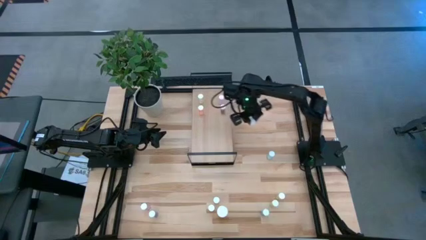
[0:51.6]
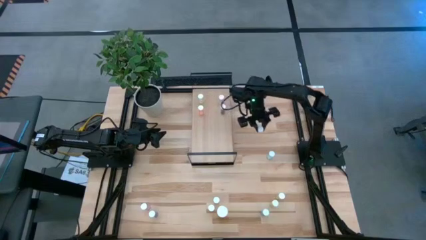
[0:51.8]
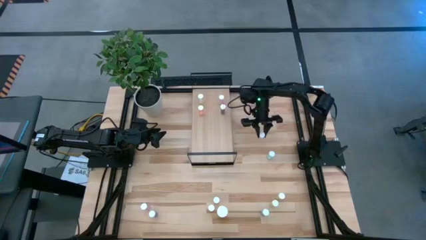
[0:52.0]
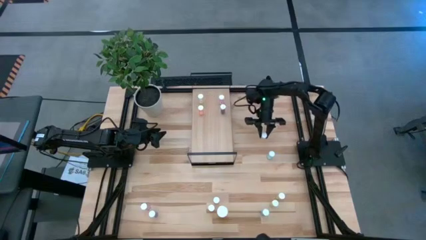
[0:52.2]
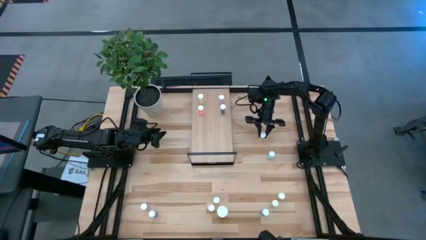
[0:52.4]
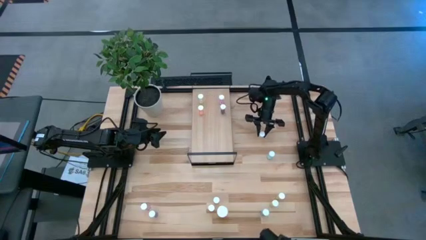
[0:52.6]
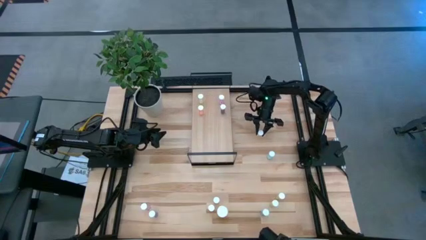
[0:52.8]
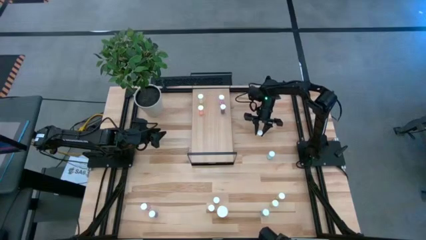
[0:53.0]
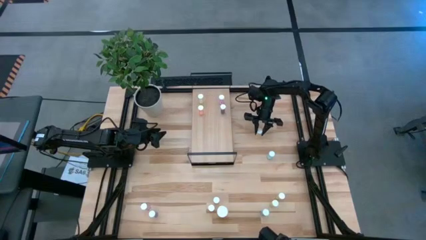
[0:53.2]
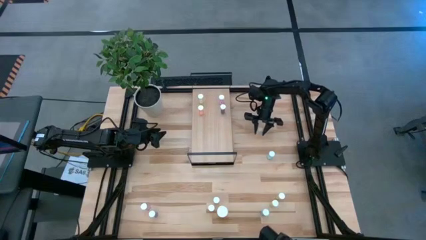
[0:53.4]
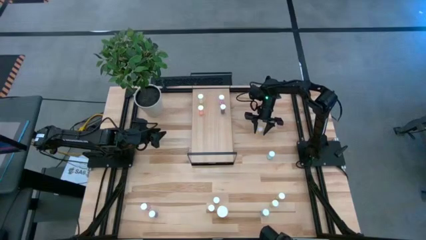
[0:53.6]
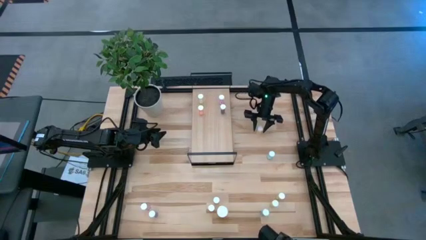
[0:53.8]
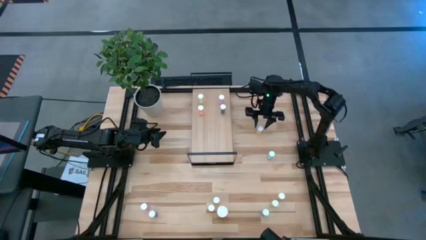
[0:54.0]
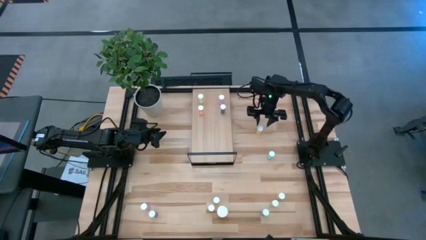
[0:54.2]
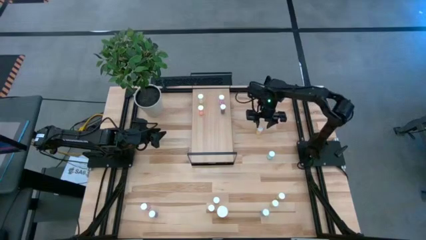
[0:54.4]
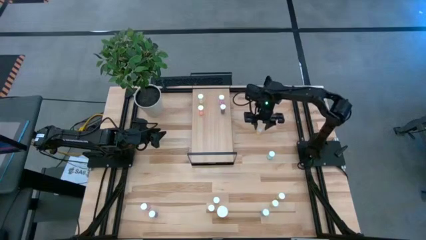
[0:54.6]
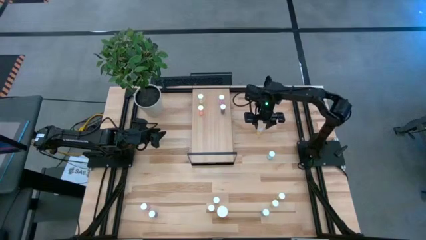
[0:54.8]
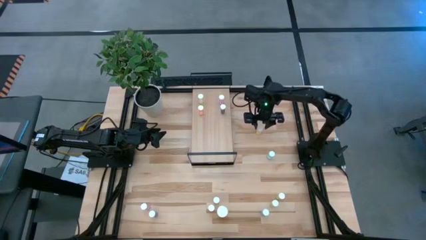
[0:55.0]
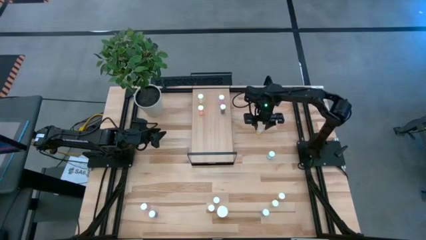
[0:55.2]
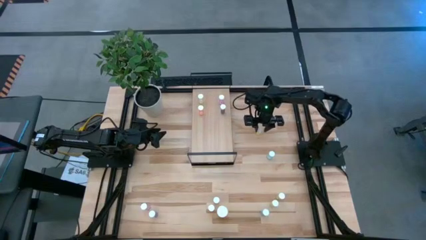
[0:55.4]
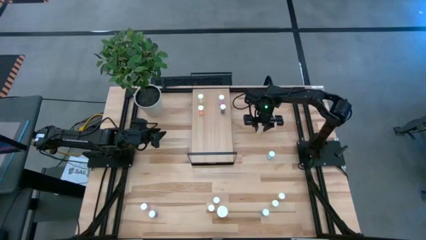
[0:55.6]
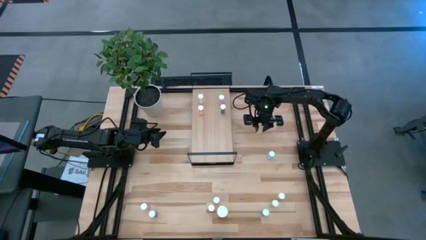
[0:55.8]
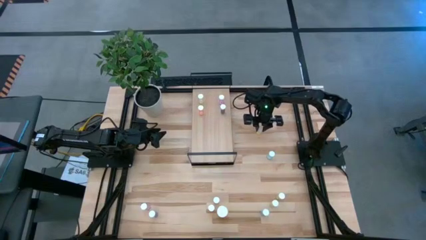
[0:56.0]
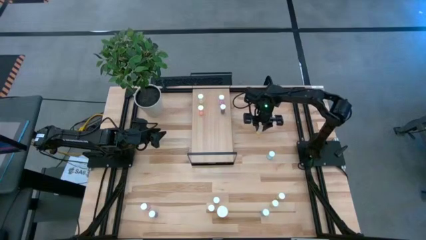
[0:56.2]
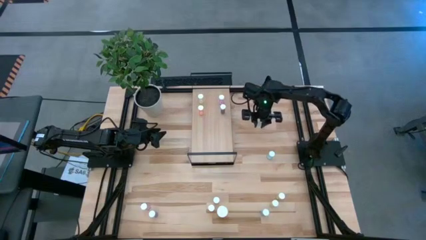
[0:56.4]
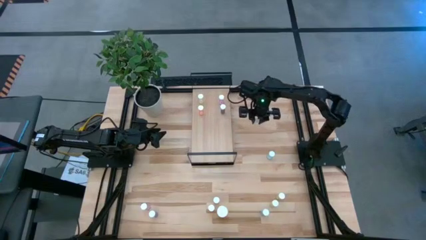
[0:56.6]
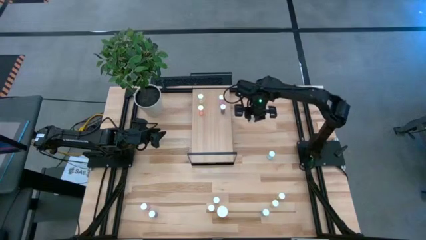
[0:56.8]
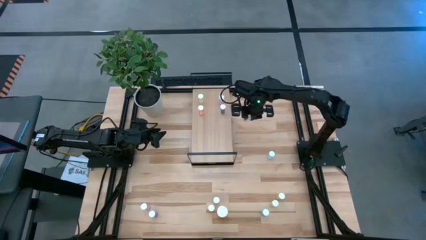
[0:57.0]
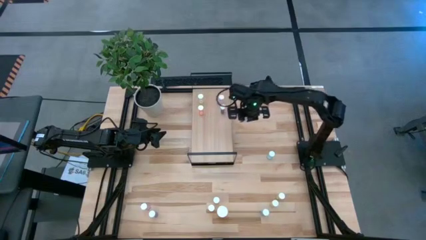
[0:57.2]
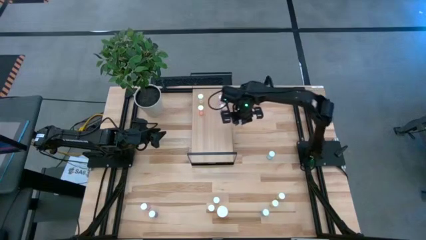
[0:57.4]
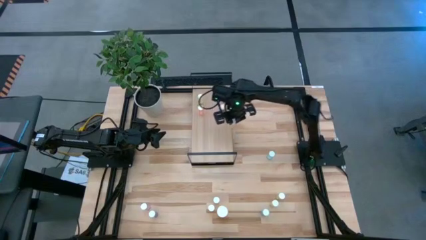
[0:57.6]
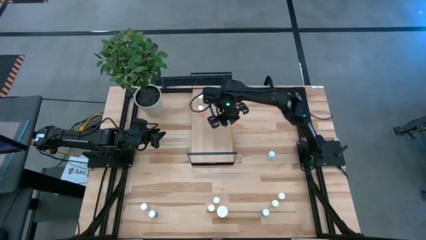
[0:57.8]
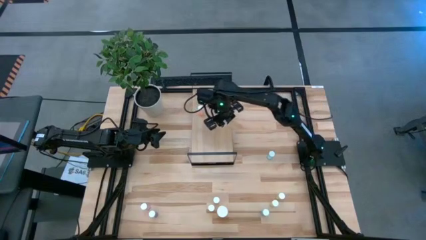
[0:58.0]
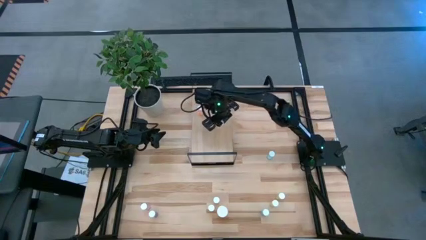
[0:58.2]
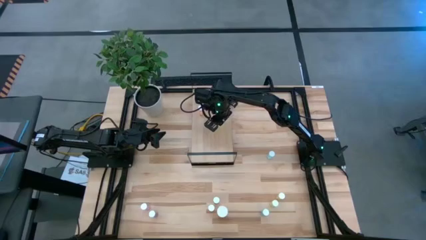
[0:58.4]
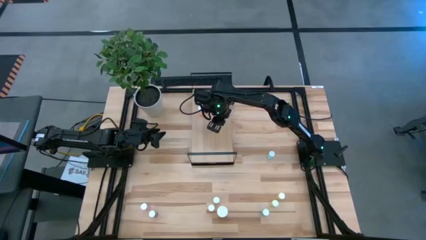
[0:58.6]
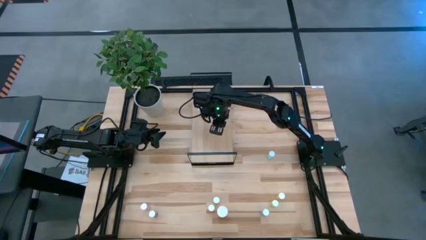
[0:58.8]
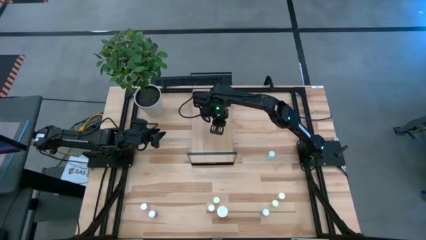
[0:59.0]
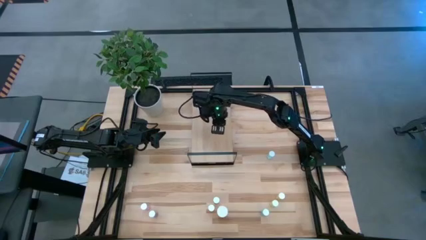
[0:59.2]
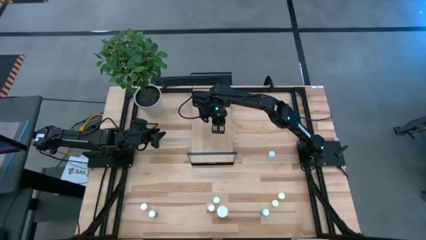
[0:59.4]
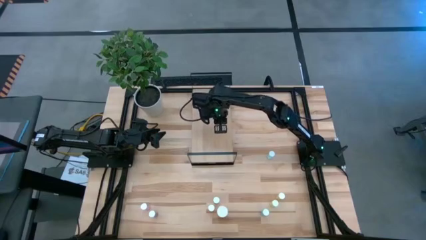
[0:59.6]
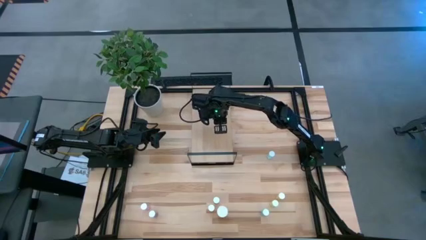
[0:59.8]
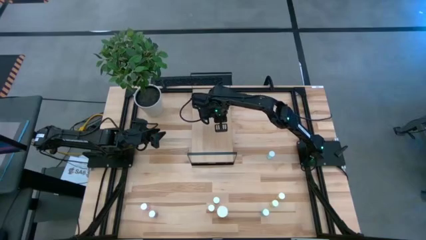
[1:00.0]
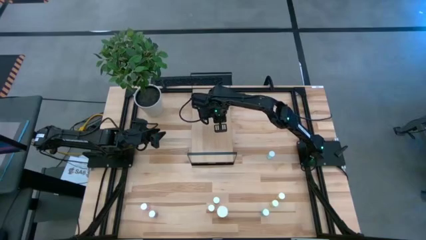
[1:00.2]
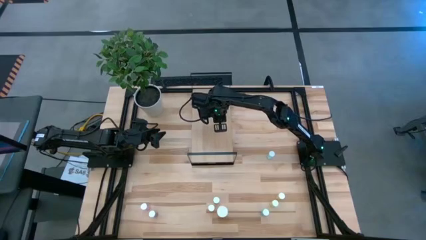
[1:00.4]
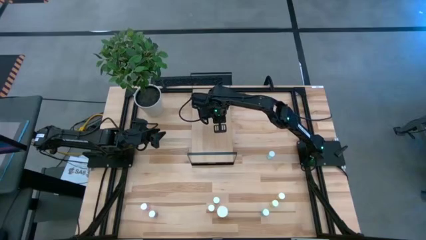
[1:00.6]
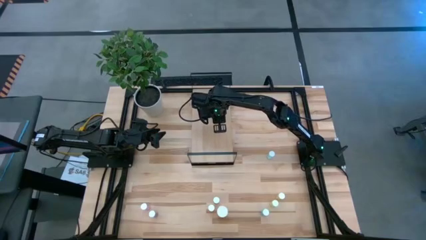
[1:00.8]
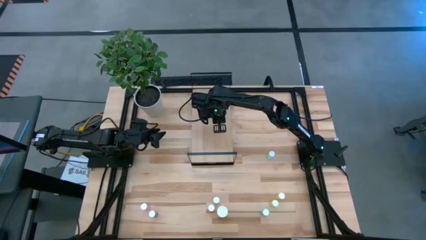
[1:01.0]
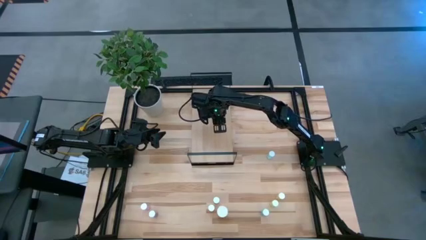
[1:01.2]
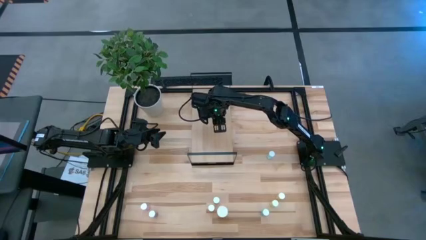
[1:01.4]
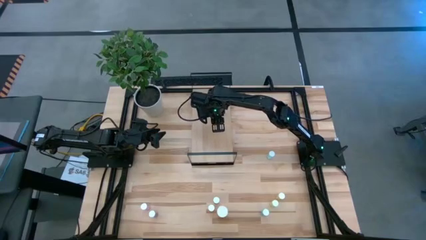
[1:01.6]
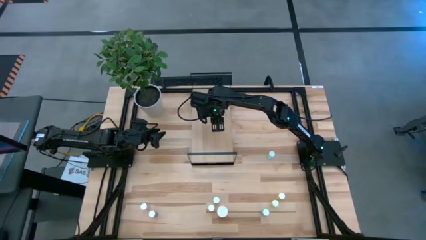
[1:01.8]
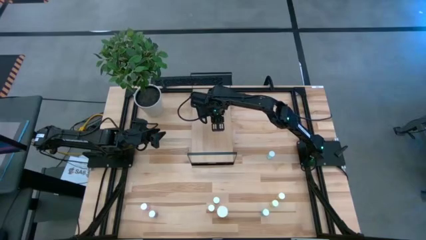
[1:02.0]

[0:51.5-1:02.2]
Task: Pick and place medicine bottles onto shelf by color
Put the yellow pill bottle on the shelf
